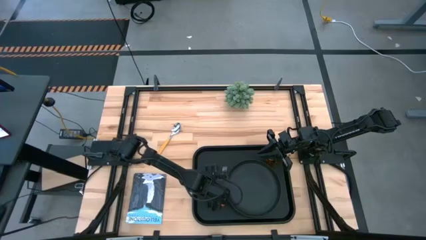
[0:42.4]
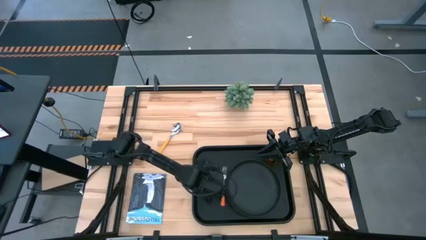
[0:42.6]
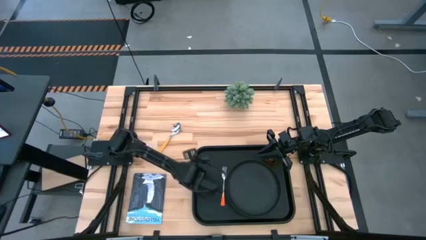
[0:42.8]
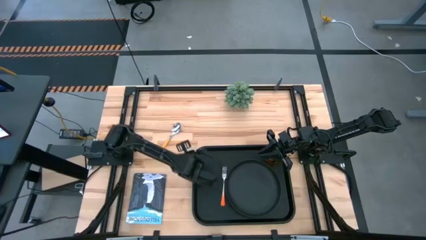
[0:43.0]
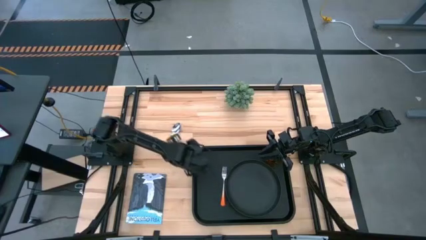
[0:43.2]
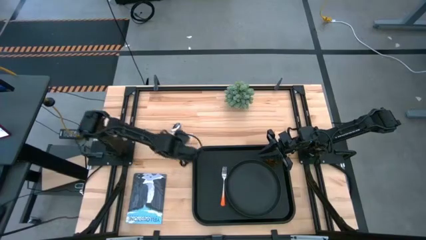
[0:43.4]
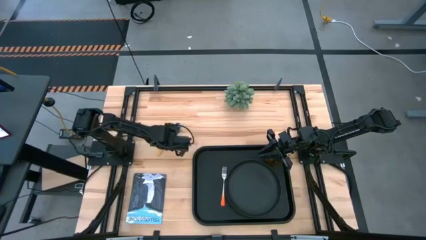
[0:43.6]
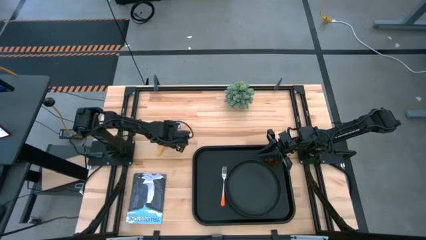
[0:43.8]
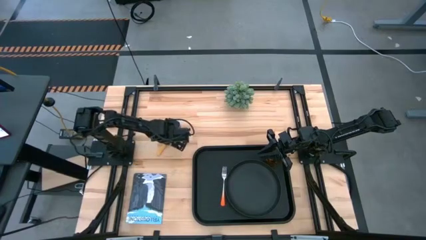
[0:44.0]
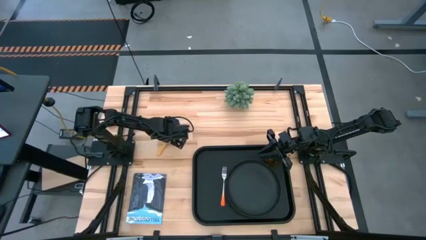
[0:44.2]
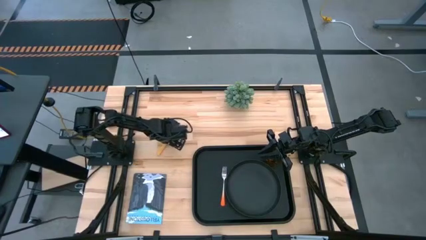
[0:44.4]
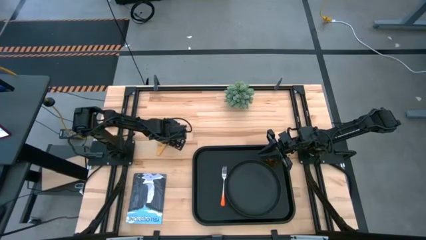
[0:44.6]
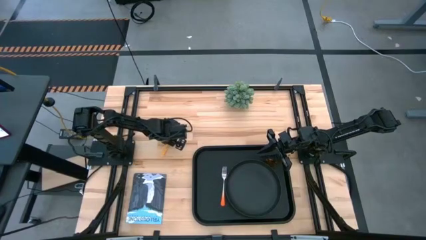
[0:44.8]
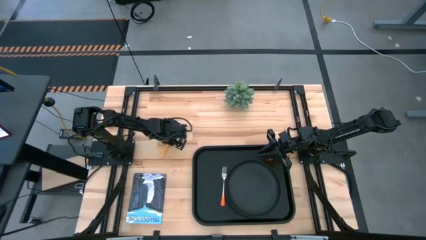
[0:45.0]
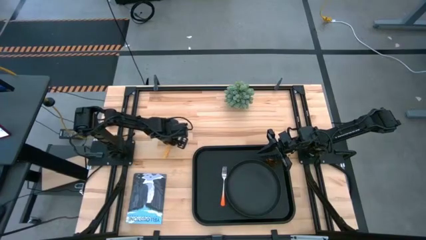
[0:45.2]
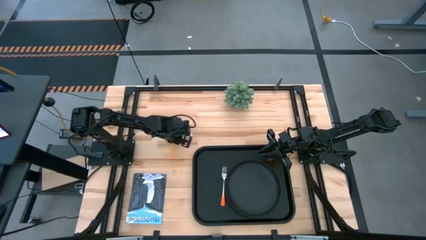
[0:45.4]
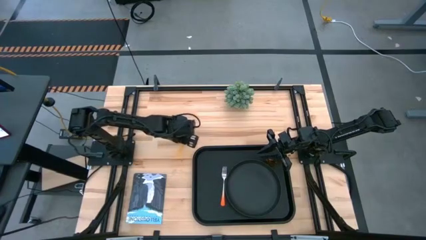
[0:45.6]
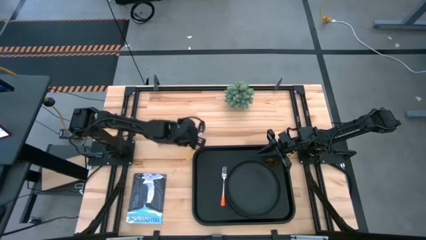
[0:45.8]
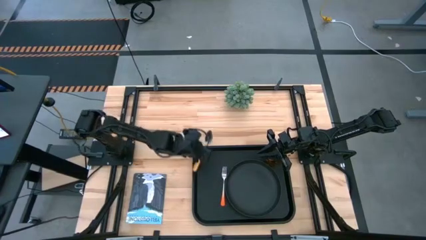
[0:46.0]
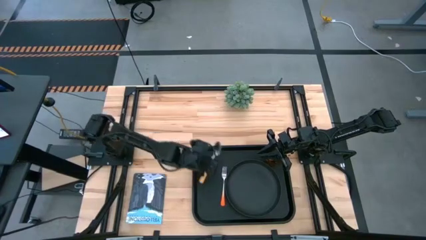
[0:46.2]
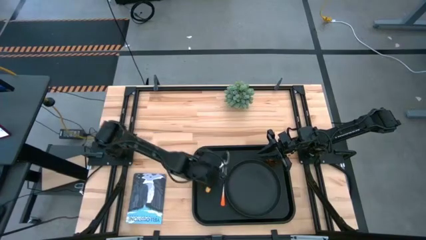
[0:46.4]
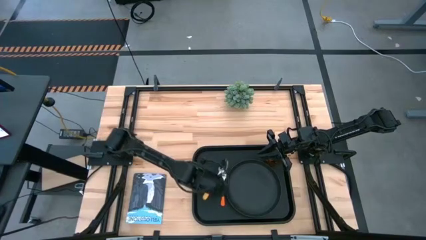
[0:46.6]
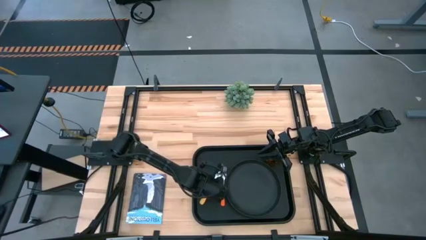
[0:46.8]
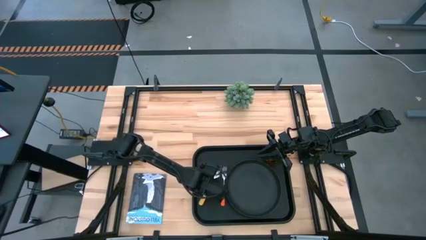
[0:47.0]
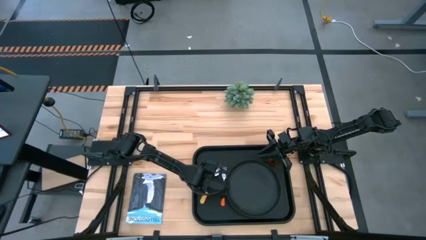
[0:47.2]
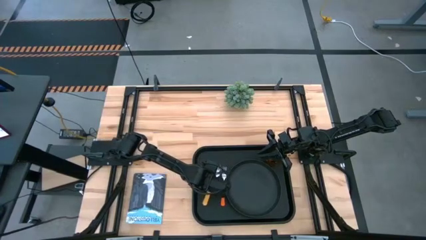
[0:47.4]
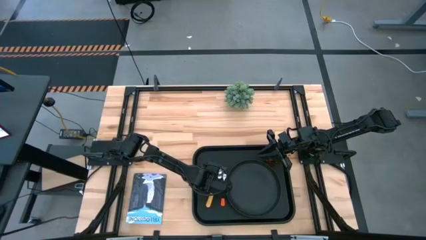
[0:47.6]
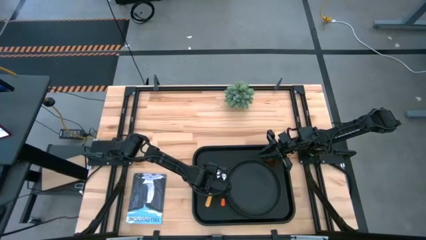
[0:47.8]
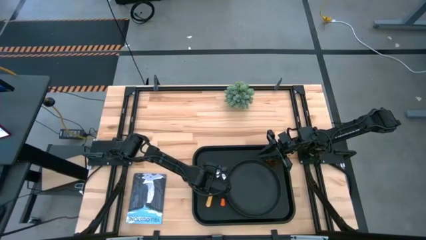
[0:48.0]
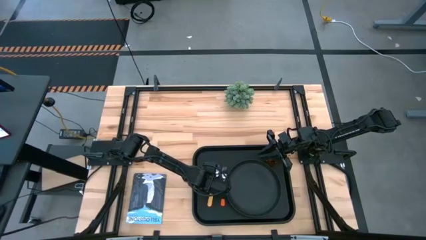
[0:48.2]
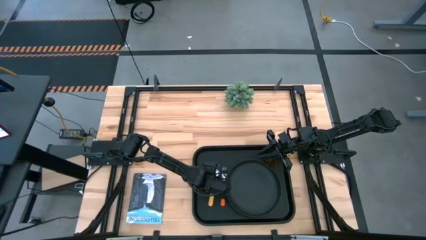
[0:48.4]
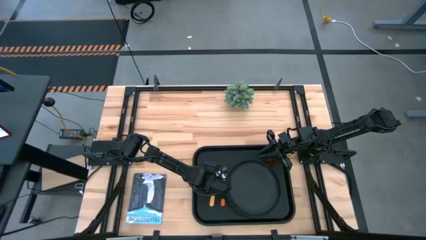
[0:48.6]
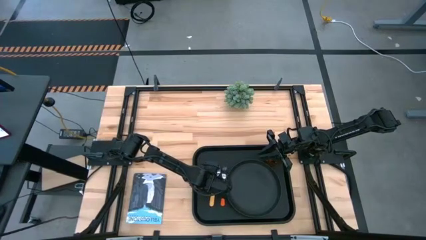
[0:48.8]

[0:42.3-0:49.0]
Task: Pick and place plate/cup/fork/spoon on tray
Put the yellow spoon on the black serving tray to the left of the orange fork

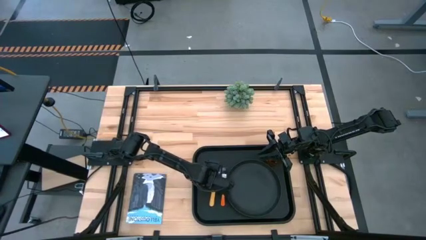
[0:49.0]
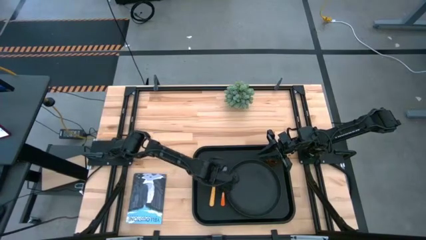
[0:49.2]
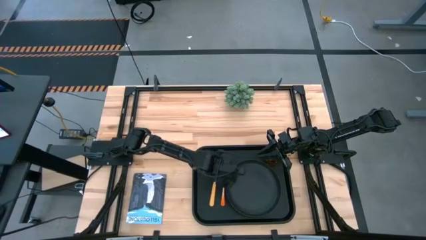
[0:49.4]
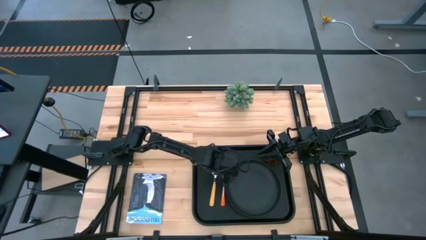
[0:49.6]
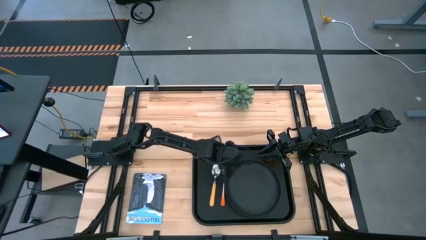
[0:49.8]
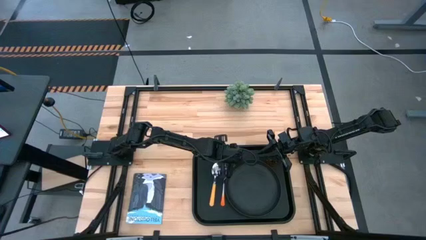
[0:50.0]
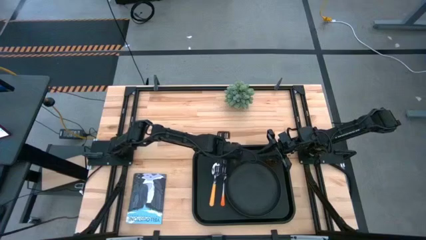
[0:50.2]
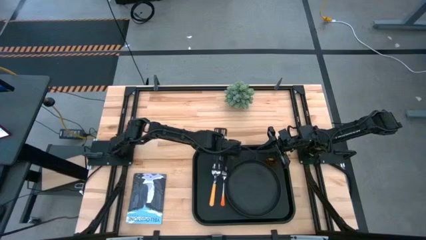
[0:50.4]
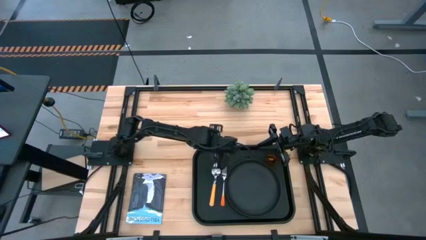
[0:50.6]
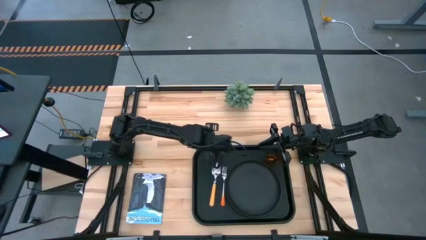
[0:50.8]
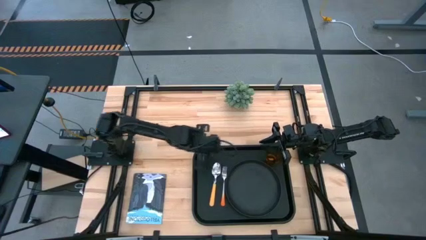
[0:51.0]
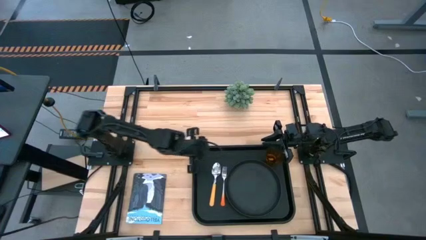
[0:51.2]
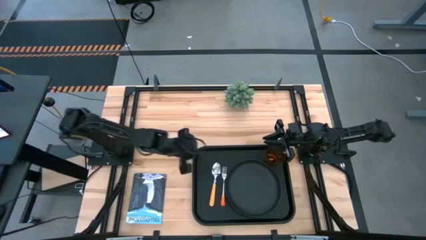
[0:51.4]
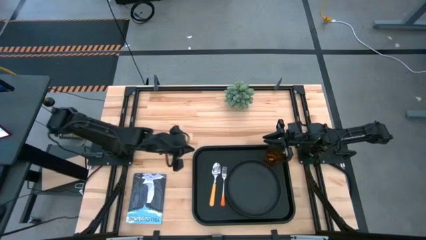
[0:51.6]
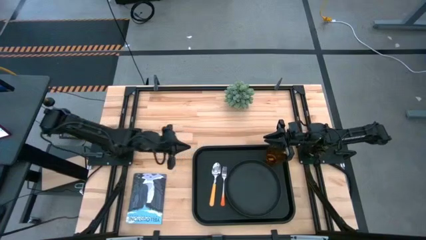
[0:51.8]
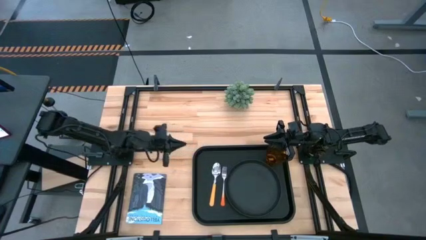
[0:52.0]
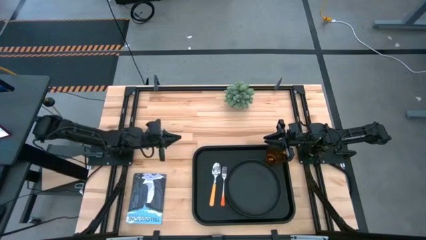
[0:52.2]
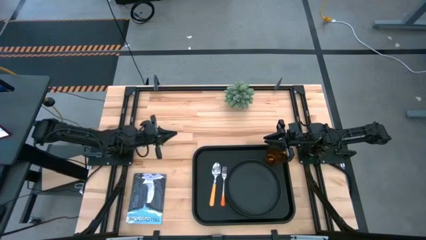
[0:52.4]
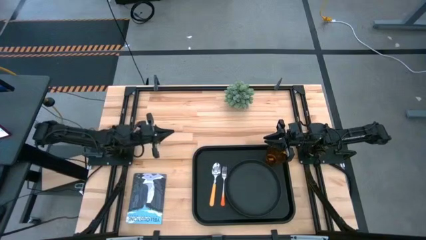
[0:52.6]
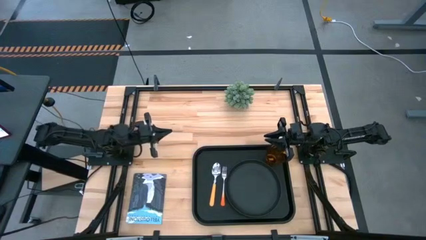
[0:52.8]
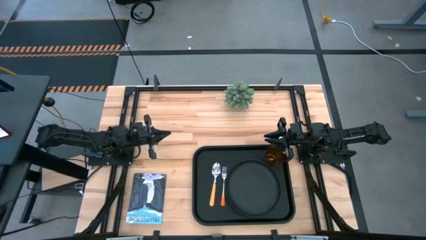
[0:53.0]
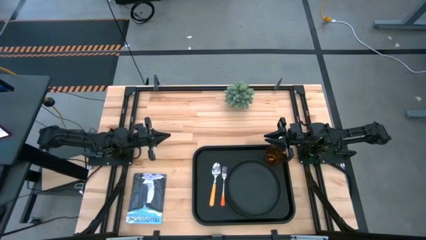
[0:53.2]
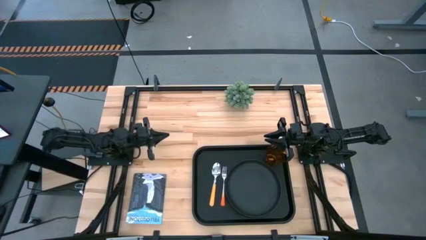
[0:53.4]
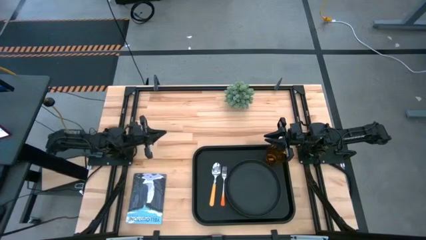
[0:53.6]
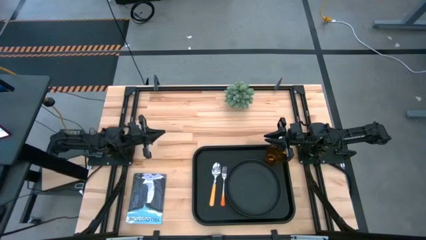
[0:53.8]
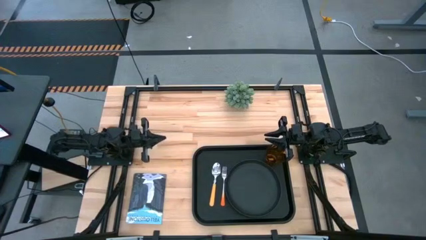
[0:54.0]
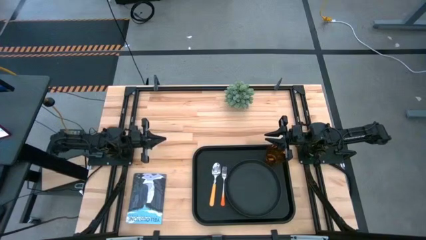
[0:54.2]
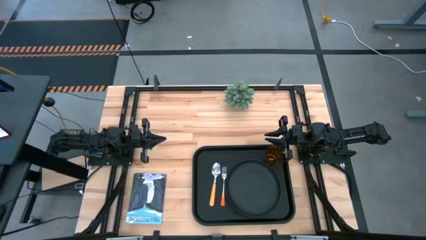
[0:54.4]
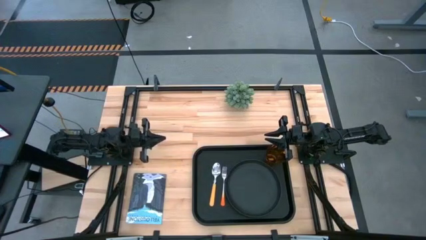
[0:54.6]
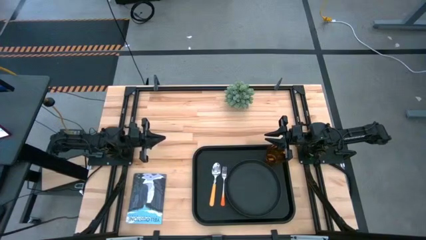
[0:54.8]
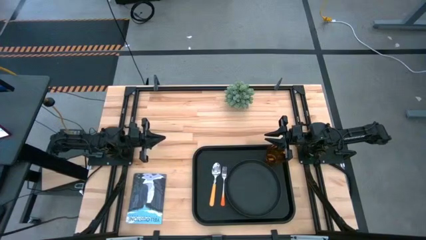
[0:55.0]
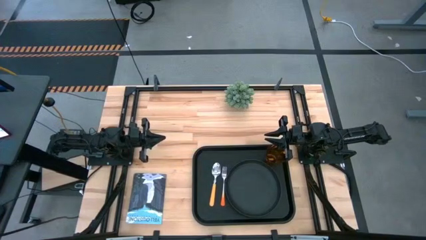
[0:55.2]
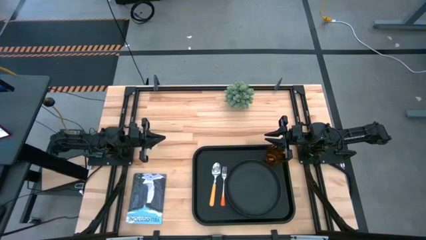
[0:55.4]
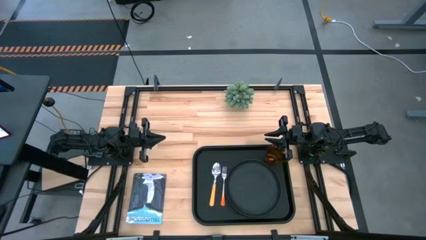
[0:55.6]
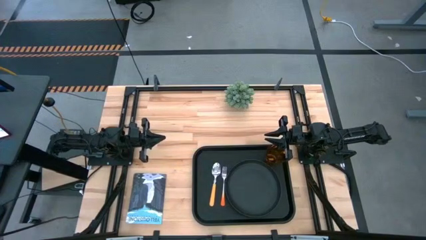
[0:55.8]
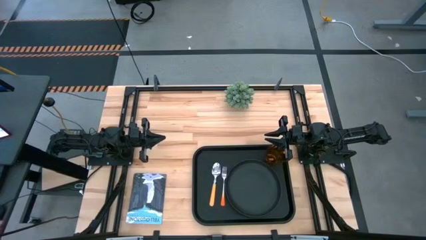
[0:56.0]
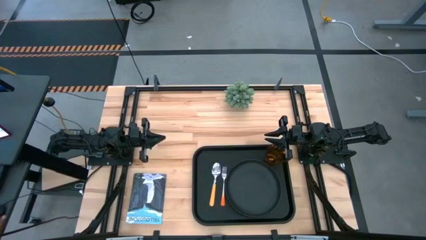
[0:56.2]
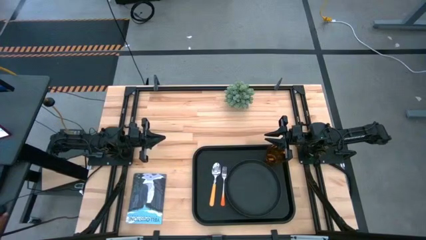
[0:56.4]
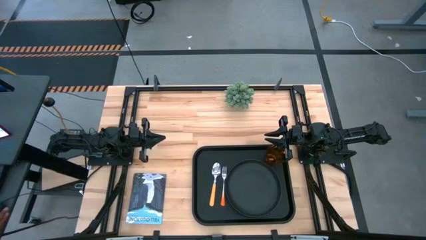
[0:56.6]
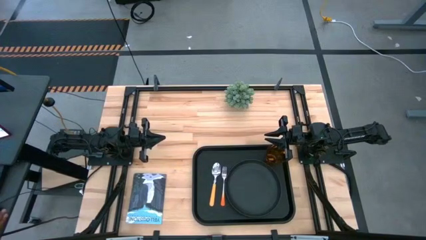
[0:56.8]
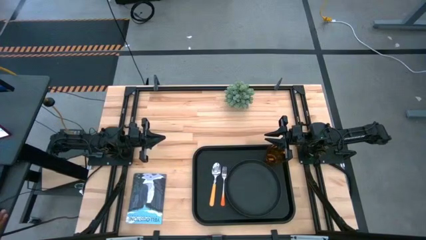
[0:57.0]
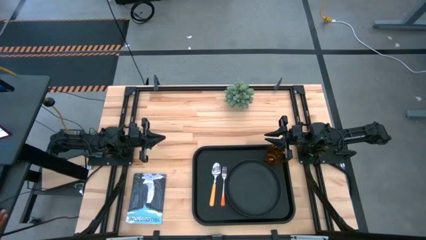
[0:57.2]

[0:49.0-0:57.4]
Return to Home Position
